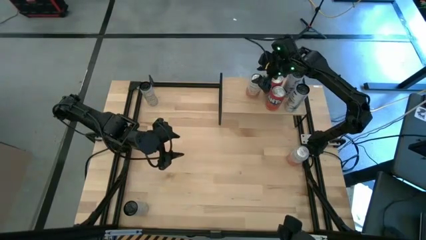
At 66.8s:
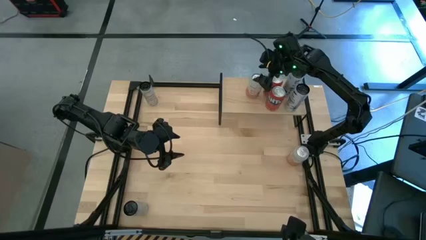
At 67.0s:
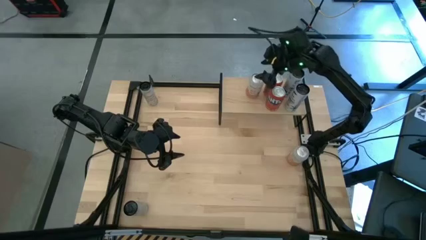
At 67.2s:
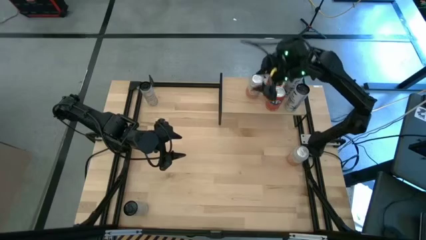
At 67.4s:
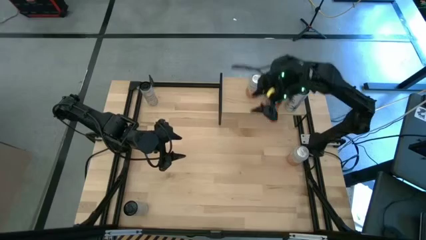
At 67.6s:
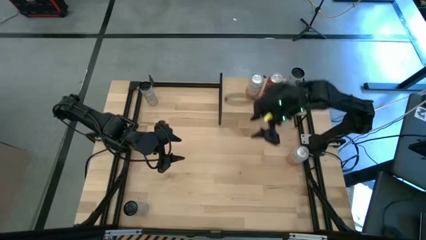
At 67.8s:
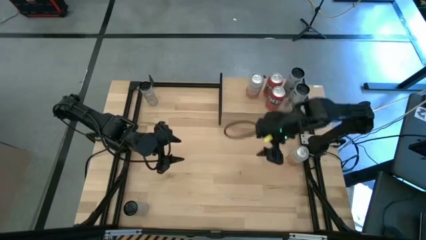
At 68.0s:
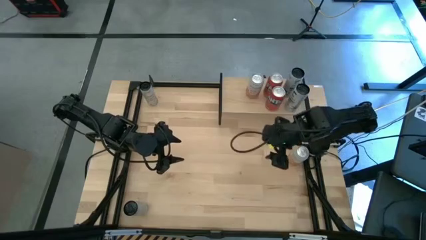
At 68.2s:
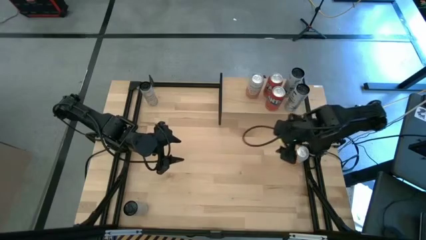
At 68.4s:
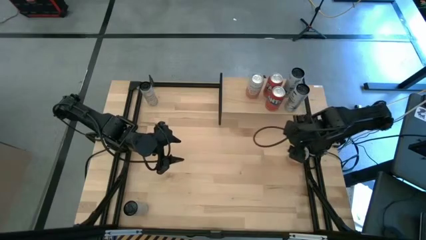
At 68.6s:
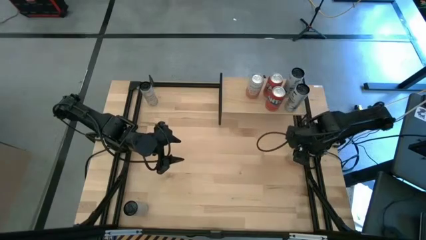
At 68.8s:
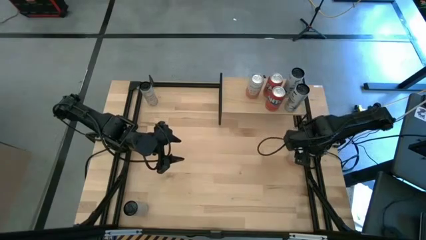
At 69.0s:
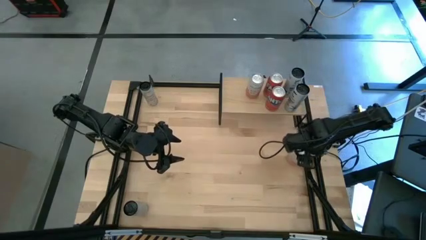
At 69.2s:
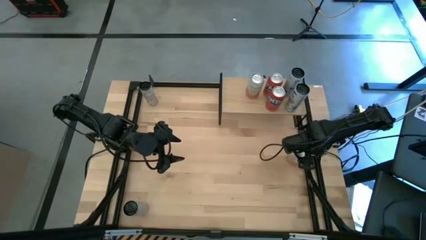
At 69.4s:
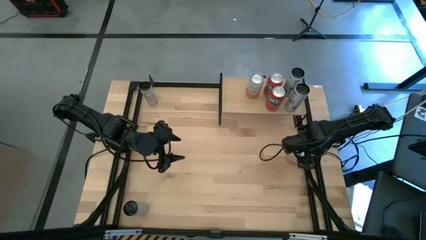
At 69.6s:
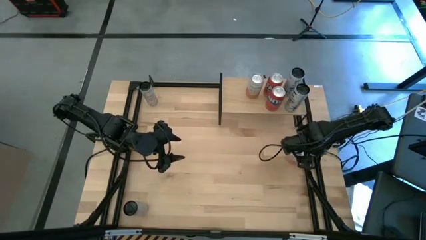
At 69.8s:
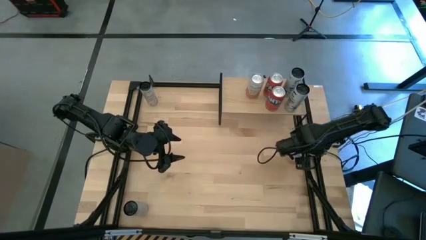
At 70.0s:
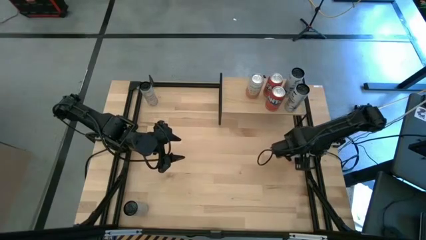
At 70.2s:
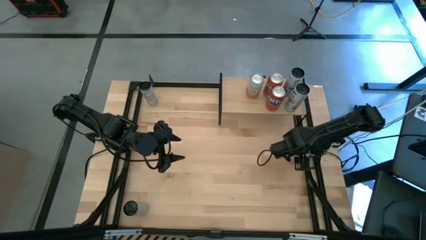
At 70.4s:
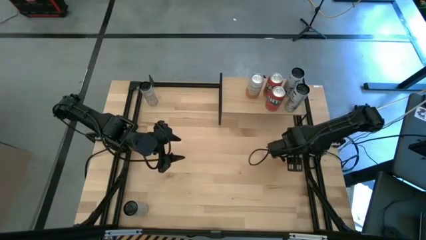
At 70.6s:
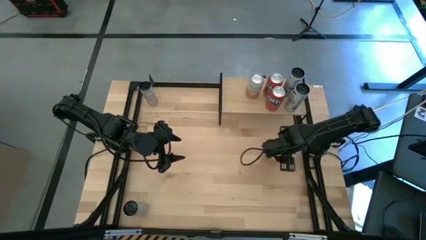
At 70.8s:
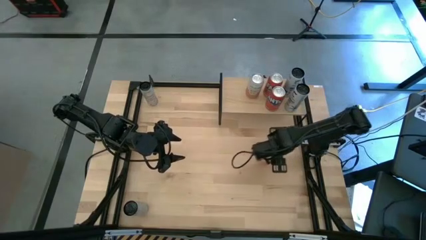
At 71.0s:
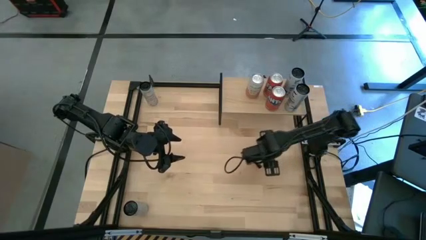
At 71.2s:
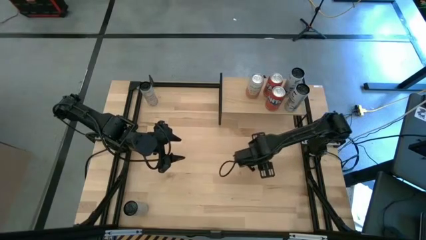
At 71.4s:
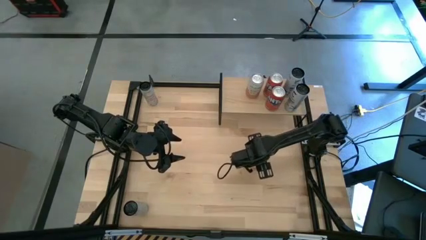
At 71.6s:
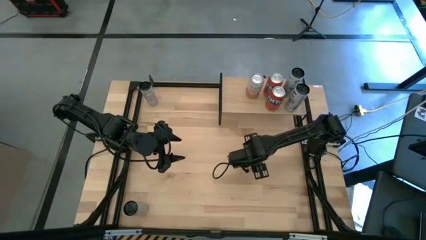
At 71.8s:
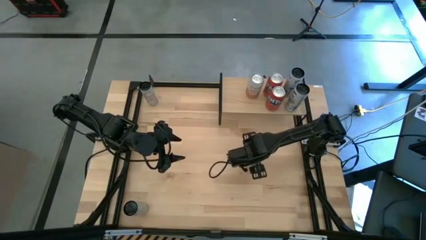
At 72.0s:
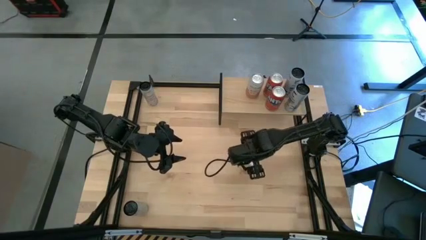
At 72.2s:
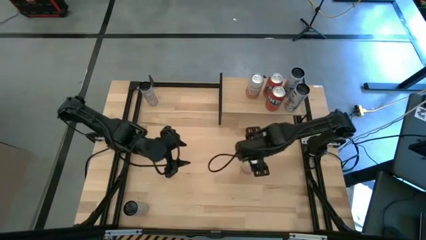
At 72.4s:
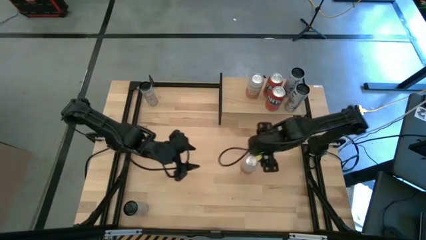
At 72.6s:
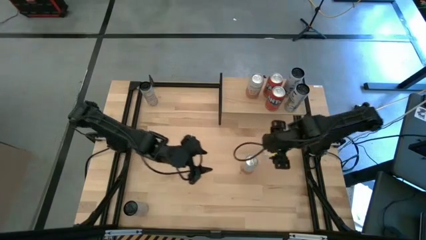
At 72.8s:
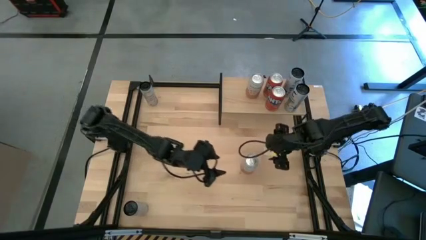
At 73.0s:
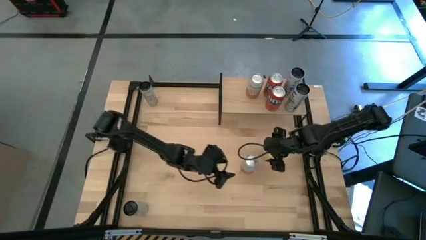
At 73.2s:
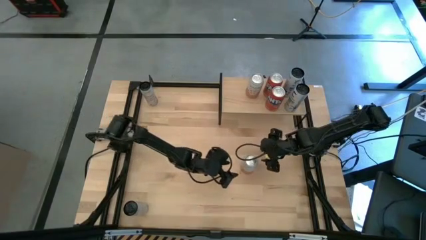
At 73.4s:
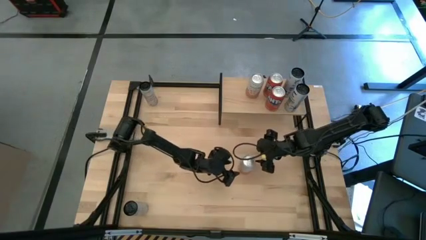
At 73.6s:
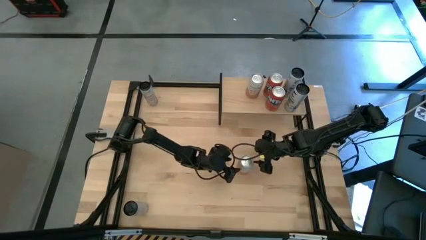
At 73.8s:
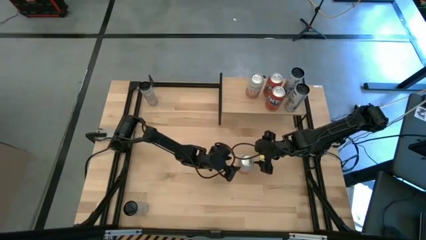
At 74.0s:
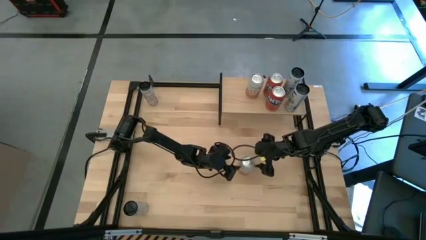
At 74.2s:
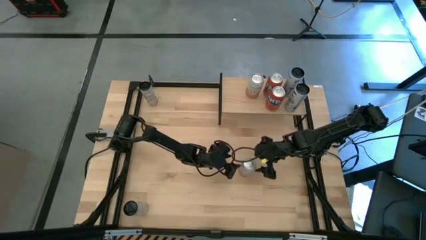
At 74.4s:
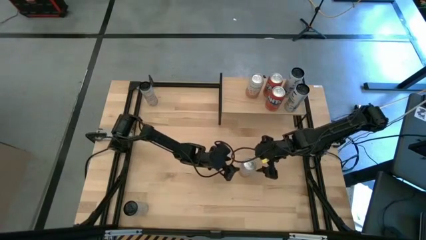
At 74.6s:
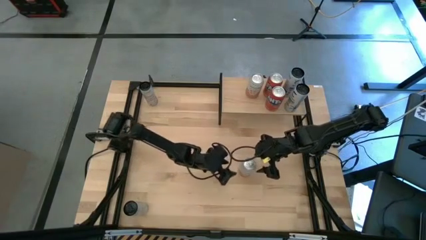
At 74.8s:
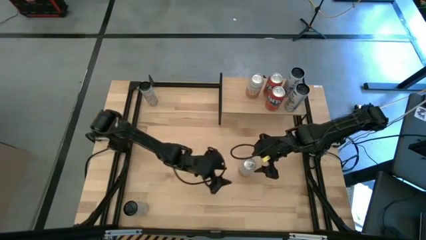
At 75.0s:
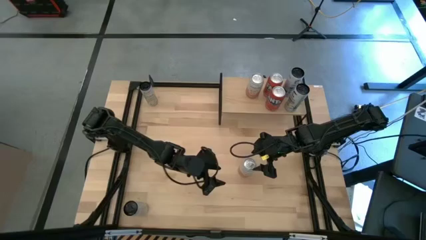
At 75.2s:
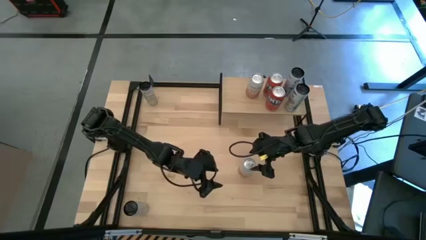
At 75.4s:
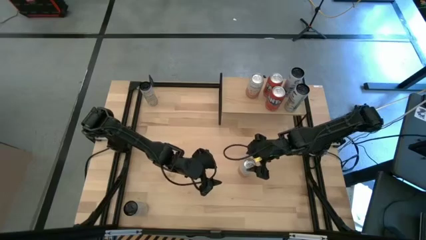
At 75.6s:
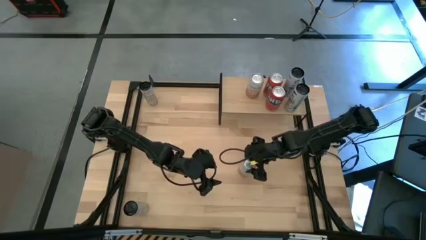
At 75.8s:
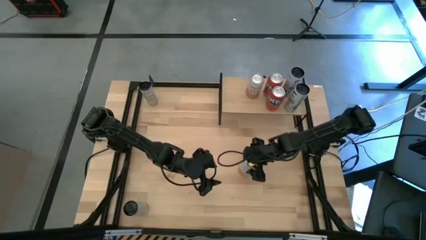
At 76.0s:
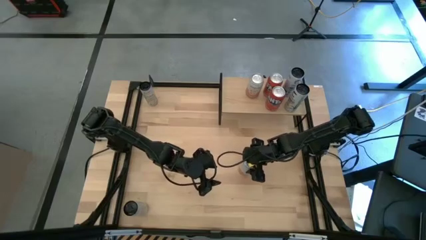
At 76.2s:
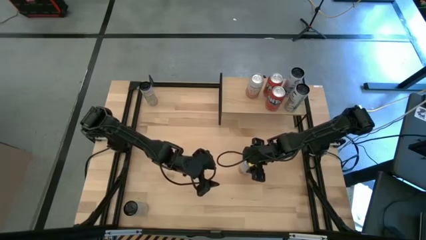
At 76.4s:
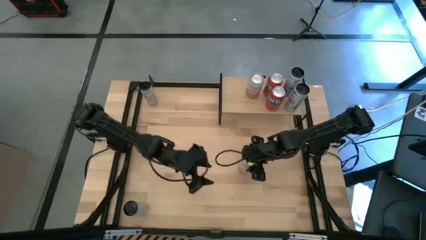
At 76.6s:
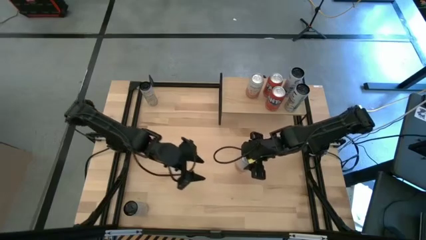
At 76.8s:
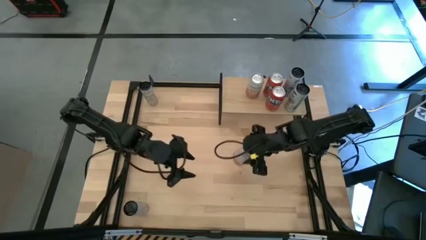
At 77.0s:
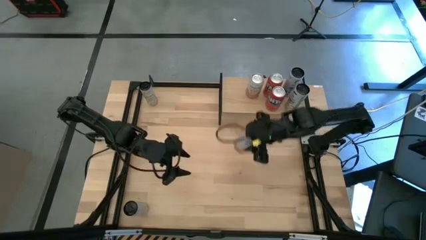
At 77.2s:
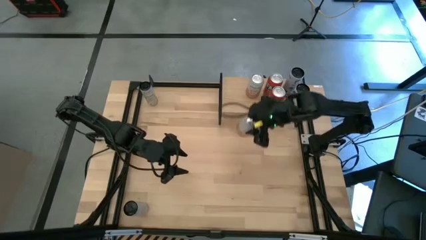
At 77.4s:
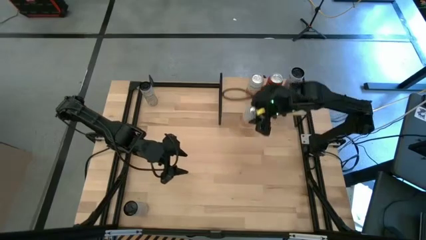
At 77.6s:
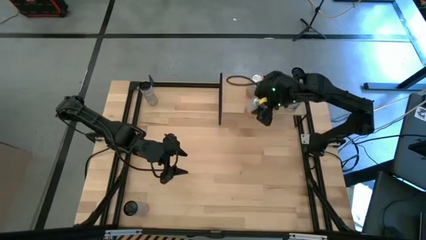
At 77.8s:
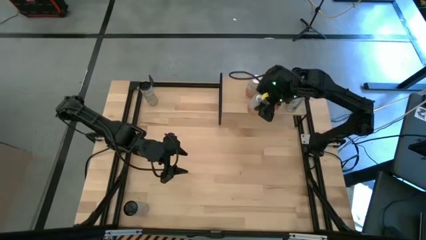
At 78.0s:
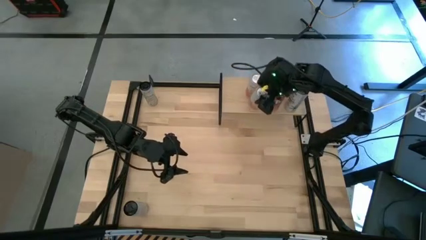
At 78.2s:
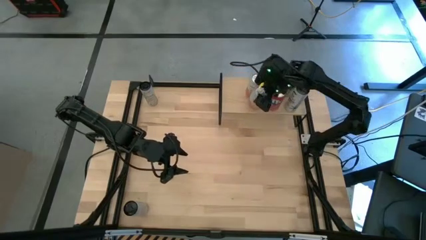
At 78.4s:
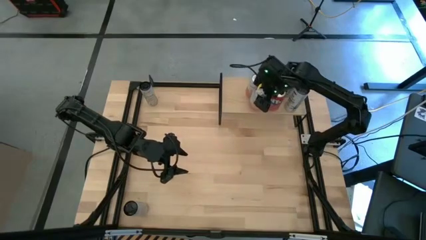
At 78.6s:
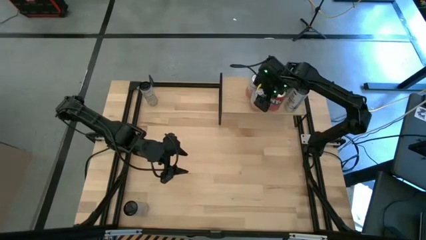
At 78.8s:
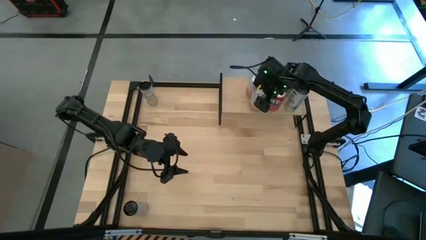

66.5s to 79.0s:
Task: Place canned beverage on shelf
Put the white pink soda can on the shelf aligned with the other white pink soda can

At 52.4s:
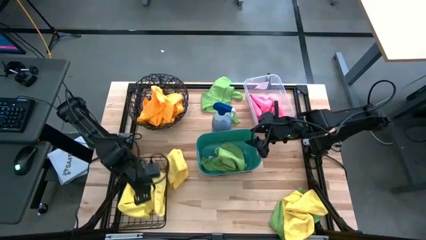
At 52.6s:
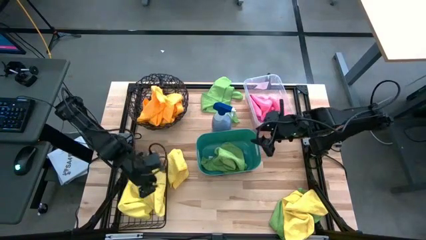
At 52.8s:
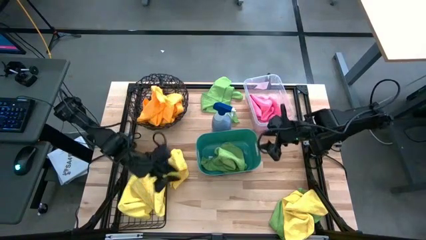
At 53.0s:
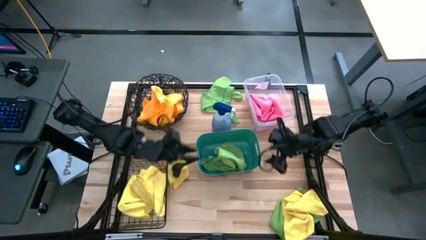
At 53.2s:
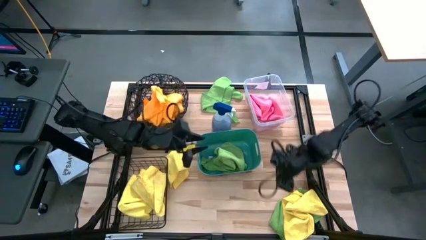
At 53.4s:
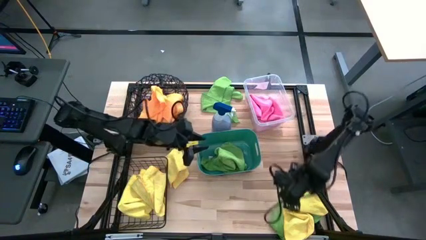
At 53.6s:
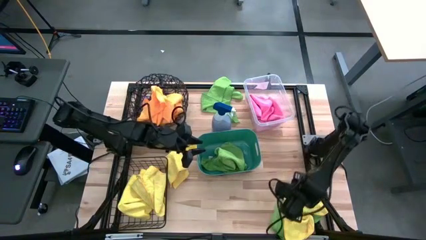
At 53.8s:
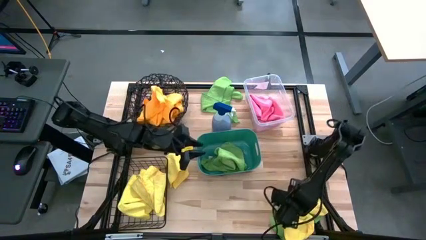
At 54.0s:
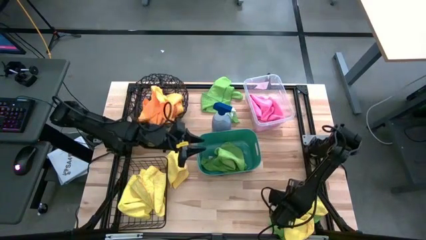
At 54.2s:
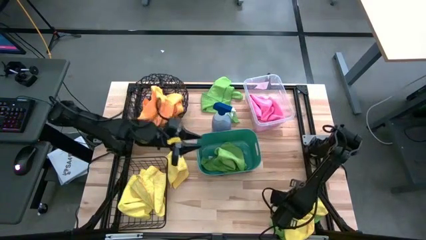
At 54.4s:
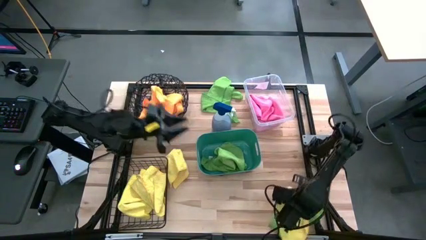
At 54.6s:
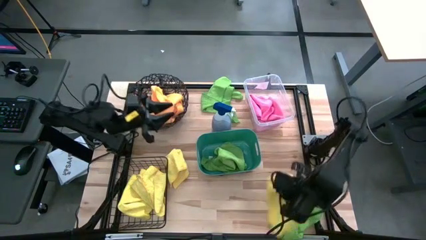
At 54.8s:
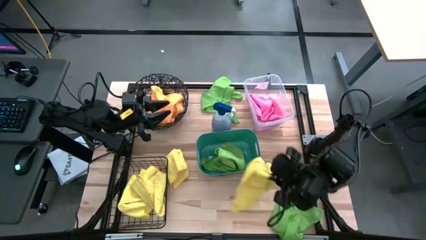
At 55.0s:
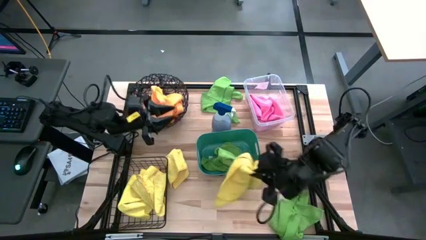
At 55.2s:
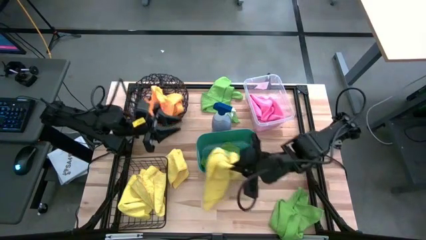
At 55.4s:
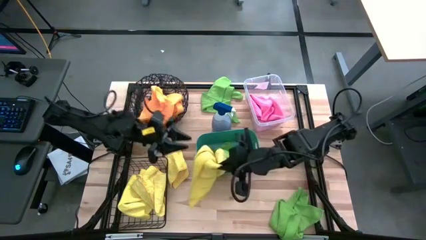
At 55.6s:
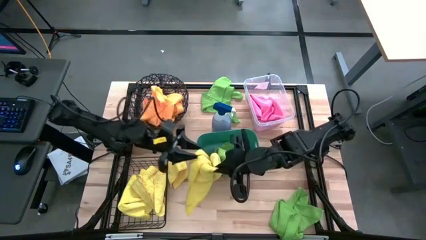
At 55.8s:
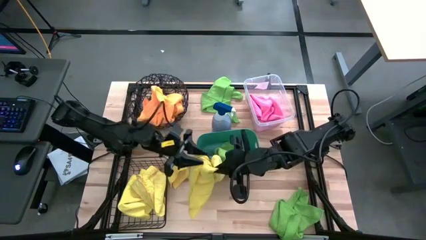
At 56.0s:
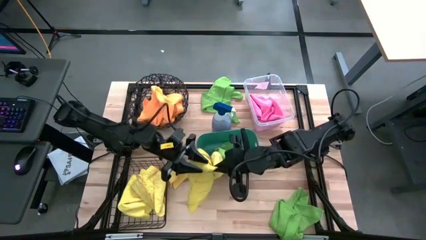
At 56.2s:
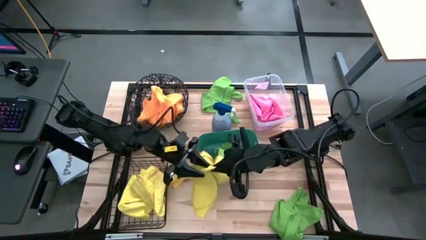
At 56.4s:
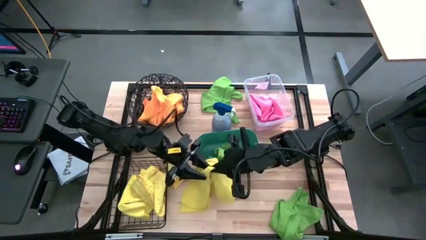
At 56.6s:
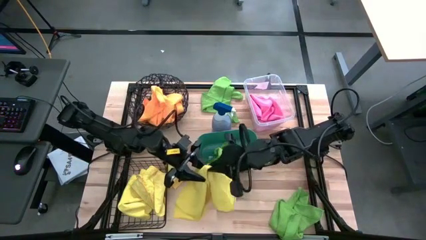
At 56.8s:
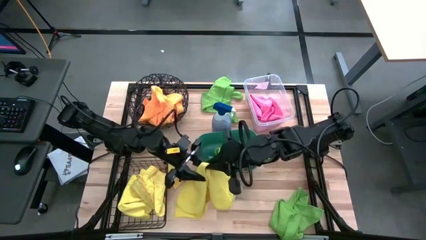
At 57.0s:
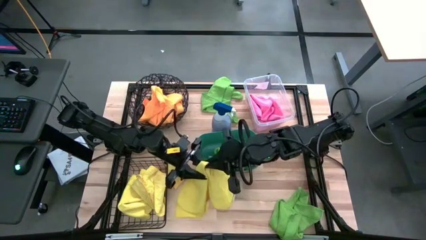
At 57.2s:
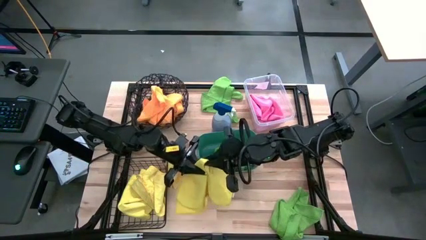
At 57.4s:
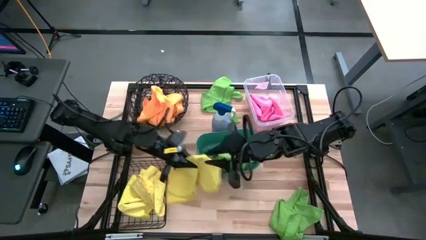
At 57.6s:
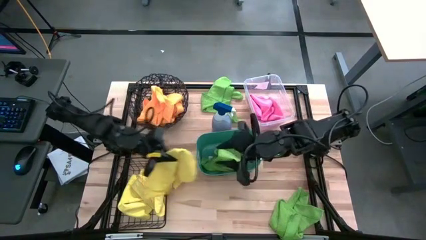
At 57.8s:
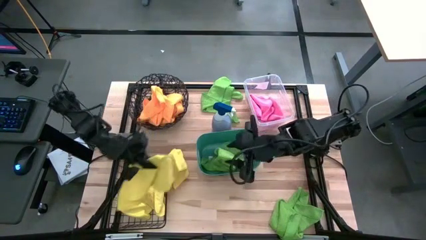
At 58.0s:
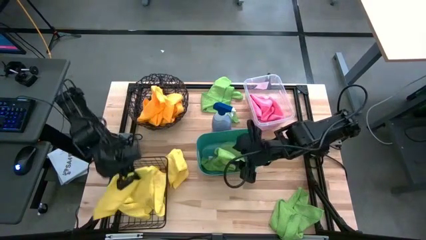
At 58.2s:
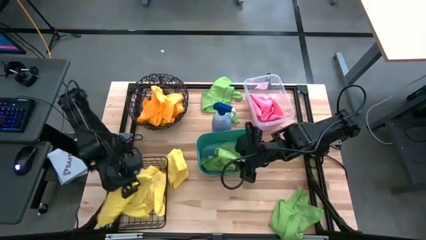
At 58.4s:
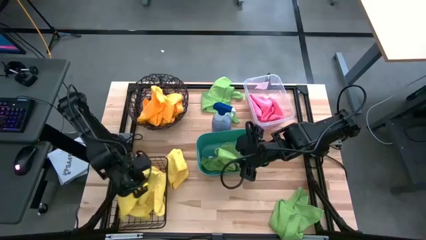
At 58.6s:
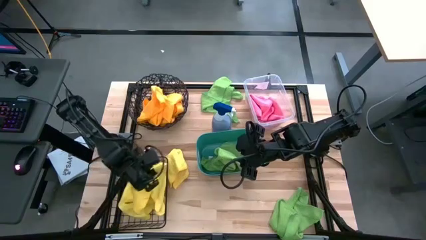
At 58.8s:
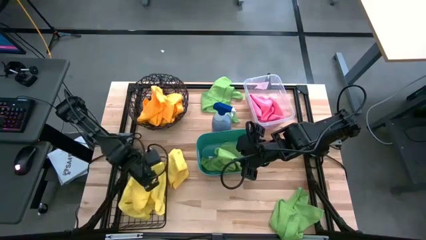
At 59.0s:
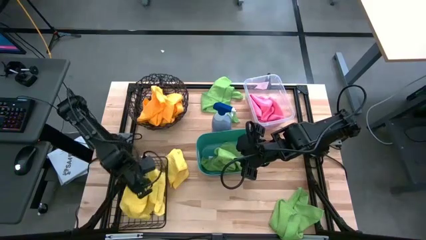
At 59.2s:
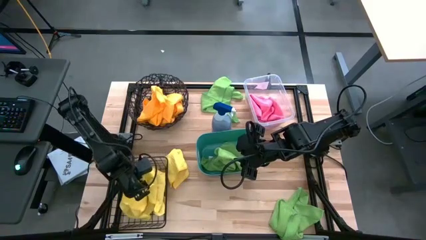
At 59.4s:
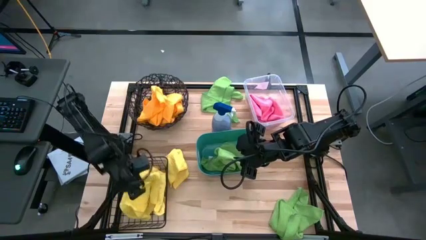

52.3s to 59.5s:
Task: Sort microfiber towel by color & place in baskets
Put the yellow towel into the wire basket
